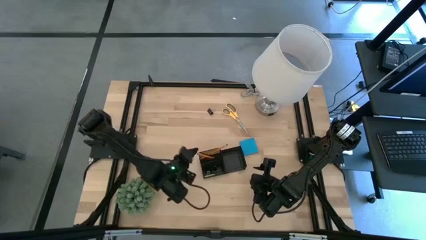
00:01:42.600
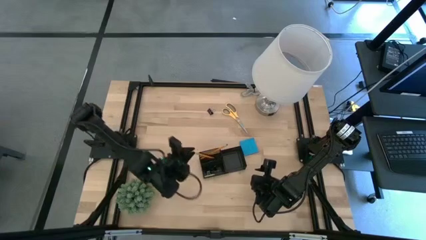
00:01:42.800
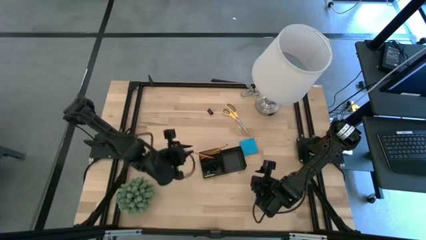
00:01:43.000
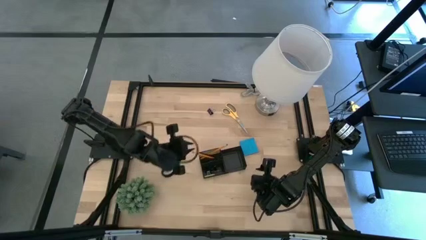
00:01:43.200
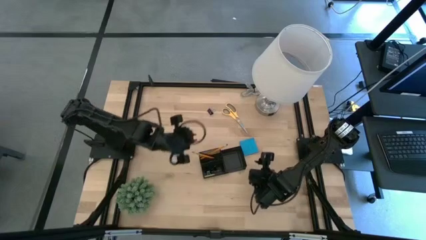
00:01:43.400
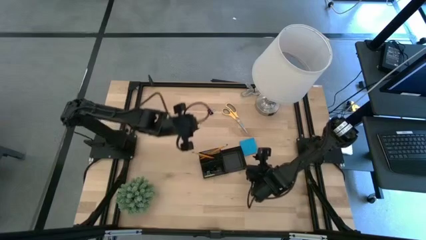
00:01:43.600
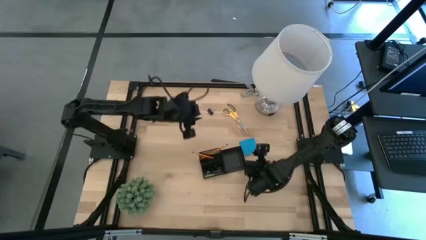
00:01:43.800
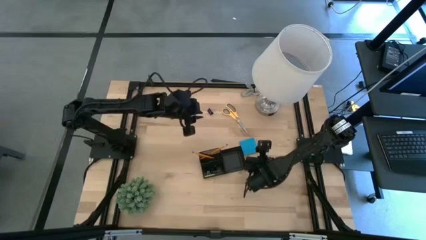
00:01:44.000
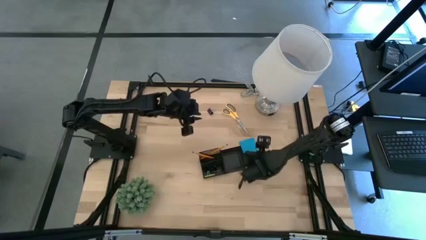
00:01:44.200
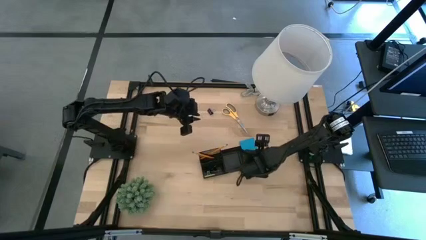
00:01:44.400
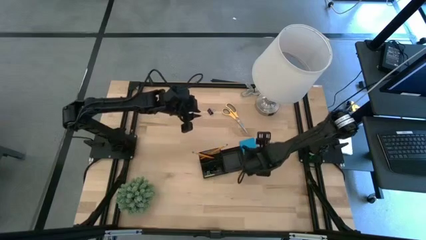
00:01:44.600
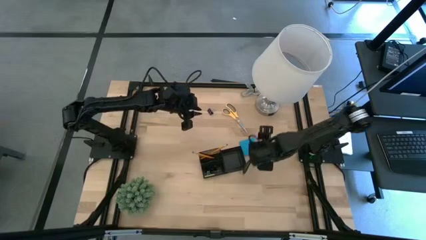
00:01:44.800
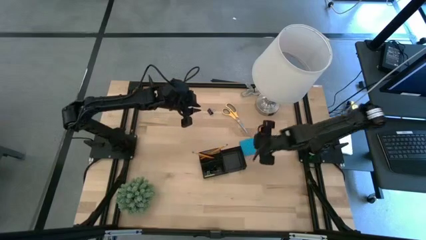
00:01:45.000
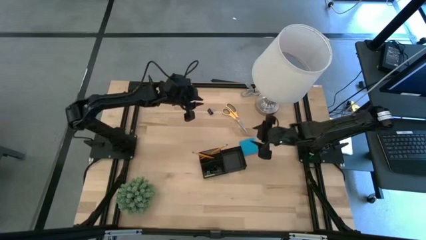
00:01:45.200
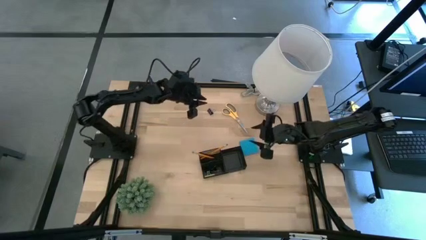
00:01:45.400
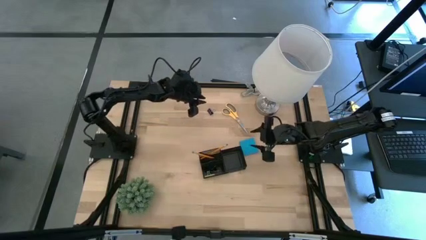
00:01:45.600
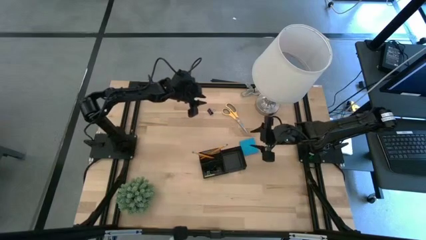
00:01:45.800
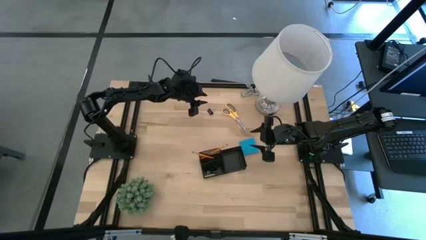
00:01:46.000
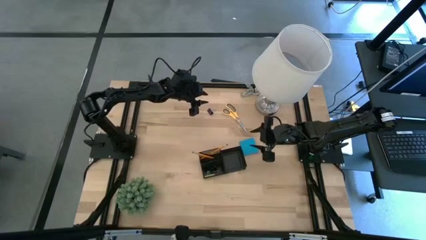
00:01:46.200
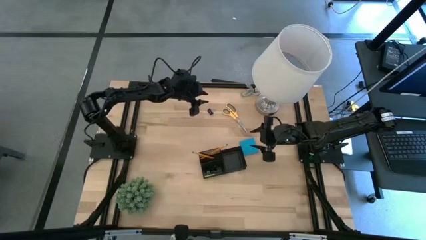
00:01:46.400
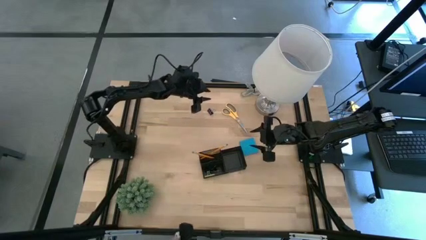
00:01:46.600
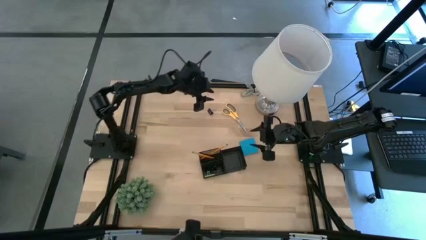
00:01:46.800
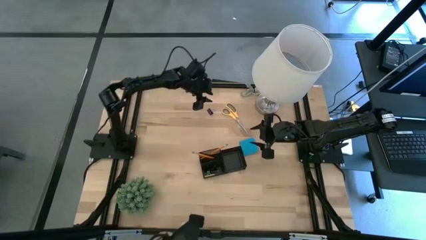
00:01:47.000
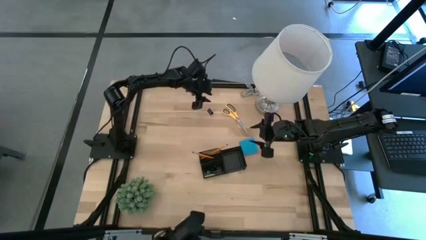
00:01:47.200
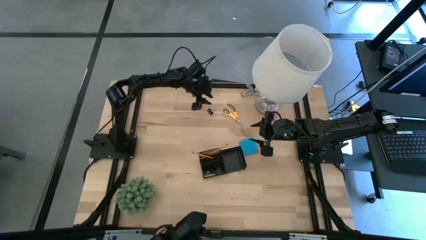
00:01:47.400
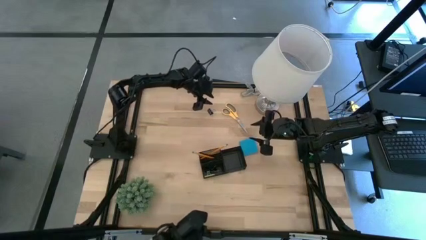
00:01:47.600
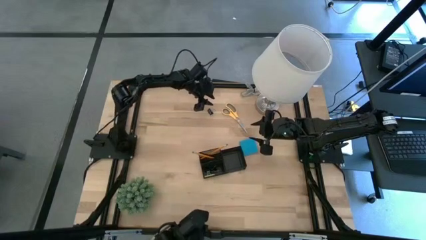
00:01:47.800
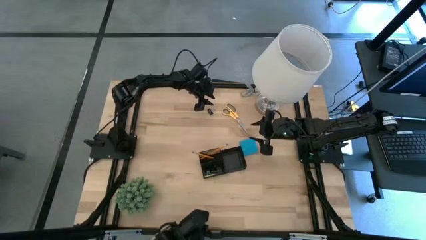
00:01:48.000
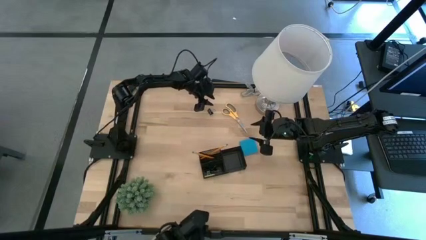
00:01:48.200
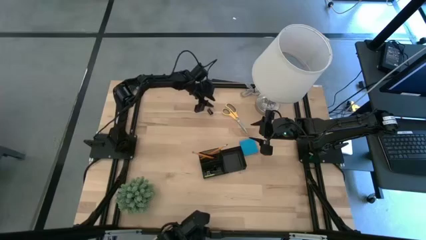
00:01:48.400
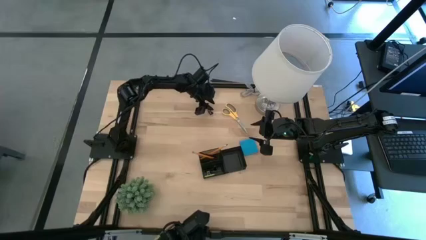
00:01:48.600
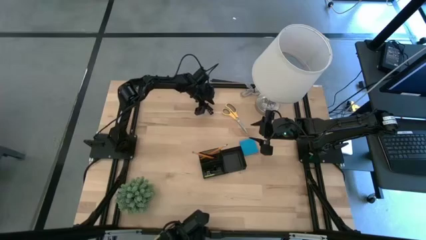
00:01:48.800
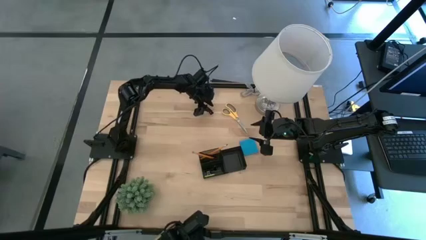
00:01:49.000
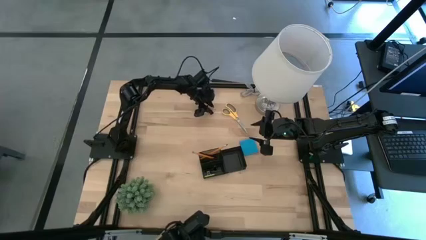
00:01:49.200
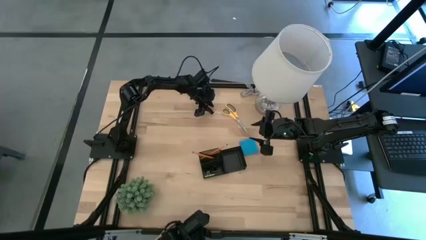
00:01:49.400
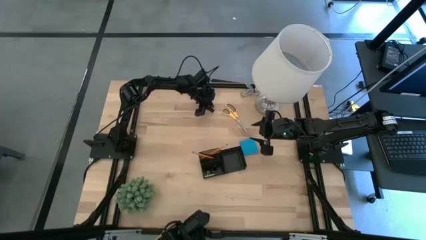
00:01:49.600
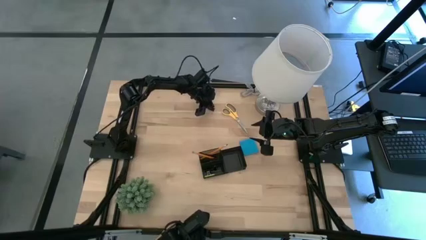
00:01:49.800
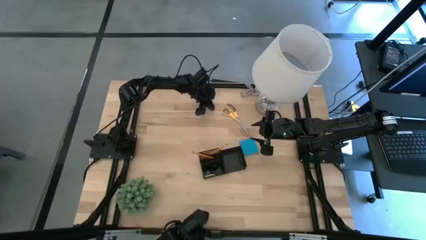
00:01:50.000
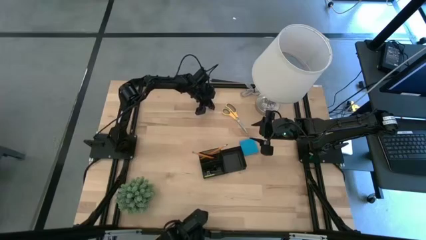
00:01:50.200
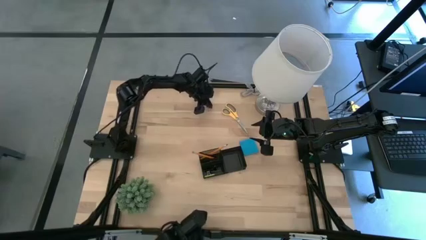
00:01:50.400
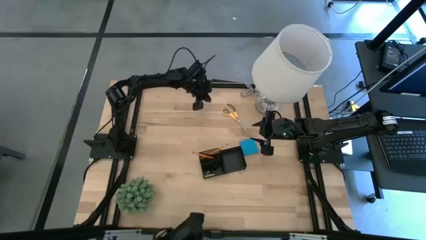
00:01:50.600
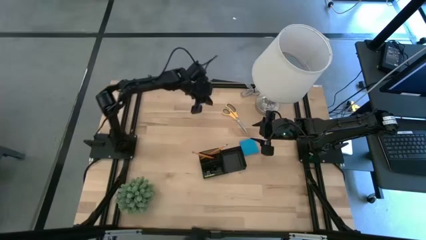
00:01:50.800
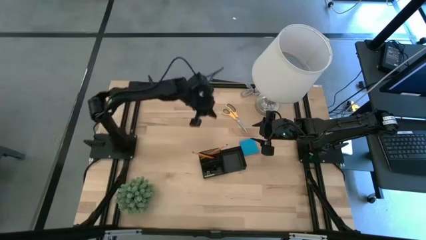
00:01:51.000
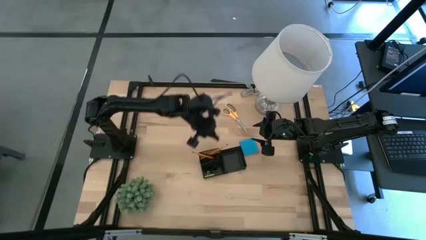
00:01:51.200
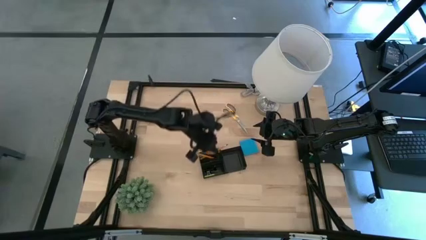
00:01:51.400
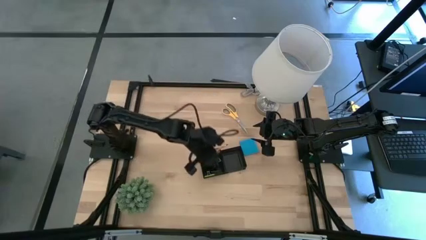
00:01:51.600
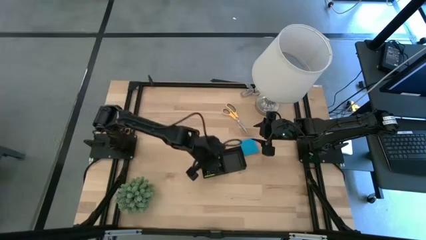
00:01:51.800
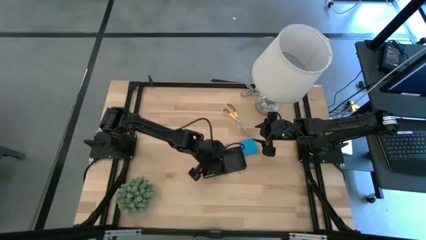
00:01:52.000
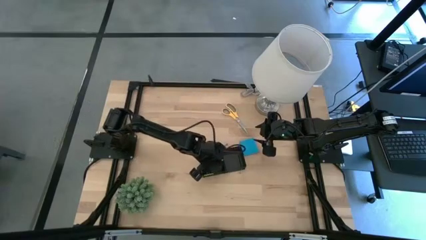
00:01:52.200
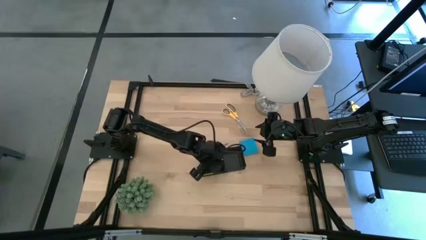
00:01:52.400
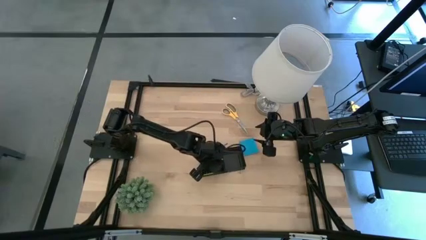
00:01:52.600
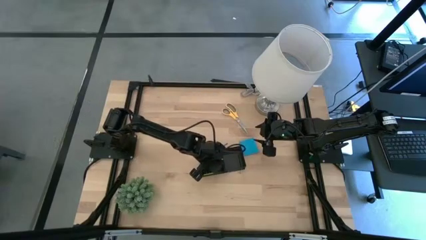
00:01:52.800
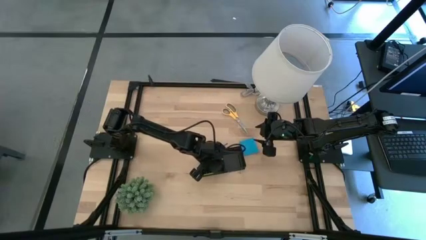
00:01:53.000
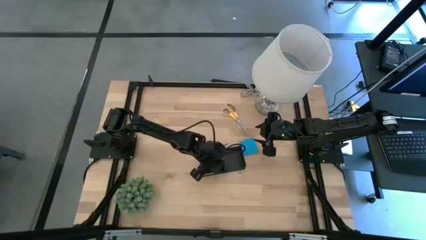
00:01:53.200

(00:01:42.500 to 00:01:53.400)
Task: Pick and place office supplies into organizer
Put the black binder clip into the desk organizer

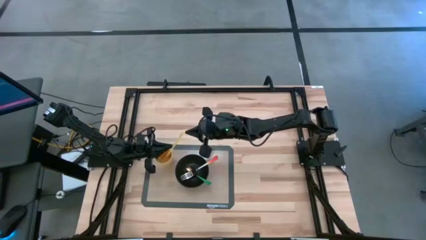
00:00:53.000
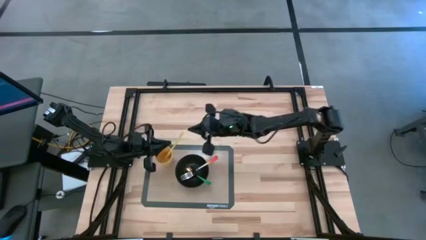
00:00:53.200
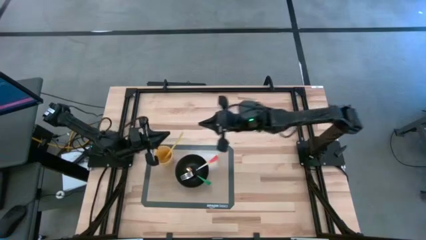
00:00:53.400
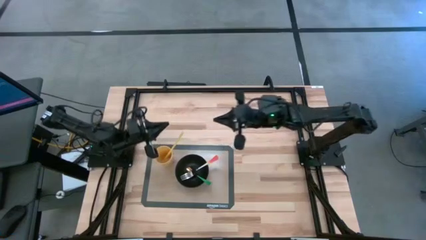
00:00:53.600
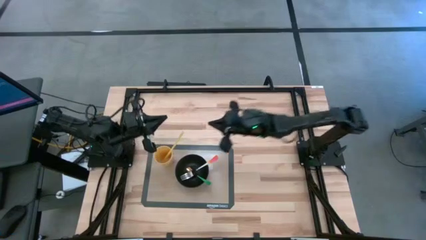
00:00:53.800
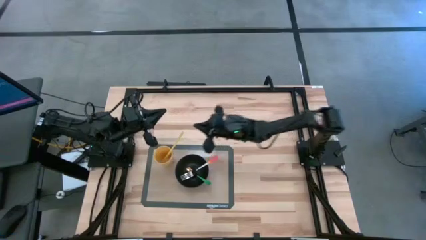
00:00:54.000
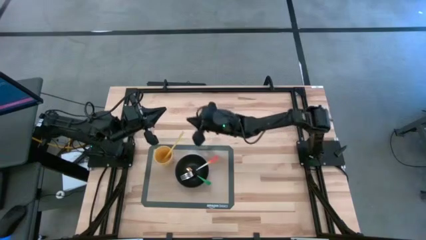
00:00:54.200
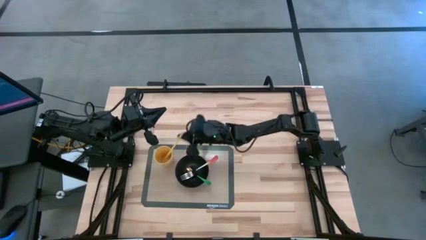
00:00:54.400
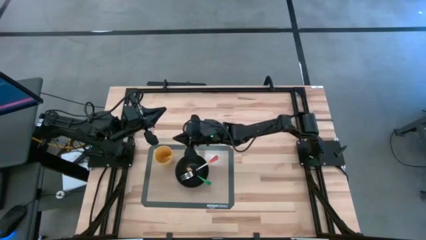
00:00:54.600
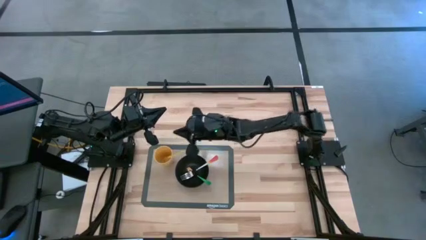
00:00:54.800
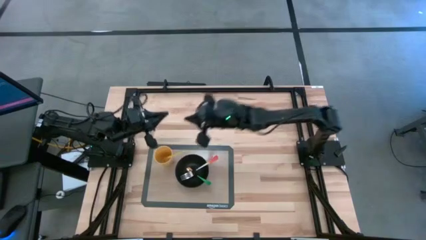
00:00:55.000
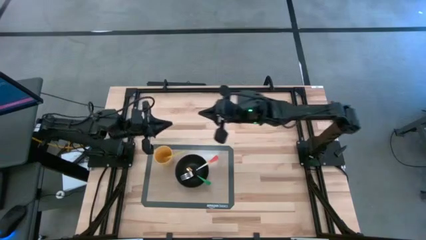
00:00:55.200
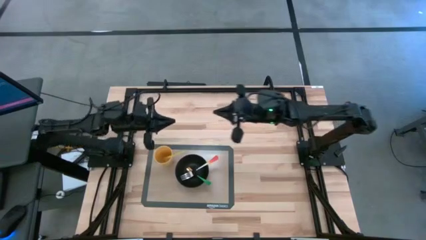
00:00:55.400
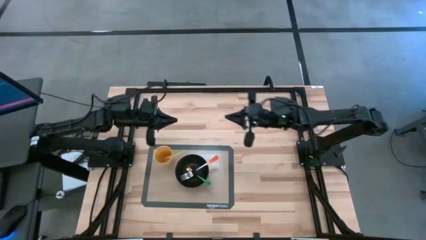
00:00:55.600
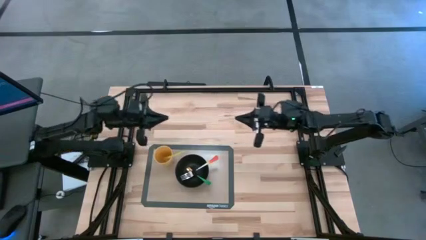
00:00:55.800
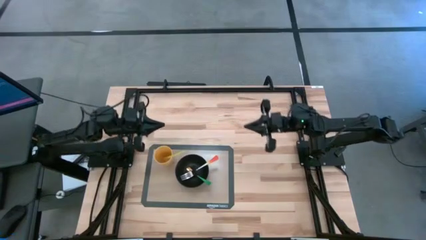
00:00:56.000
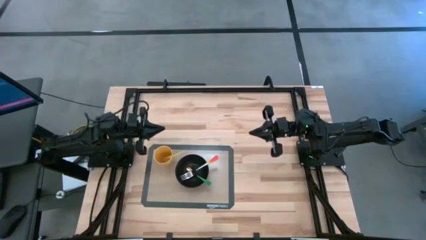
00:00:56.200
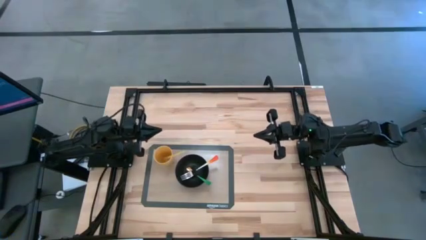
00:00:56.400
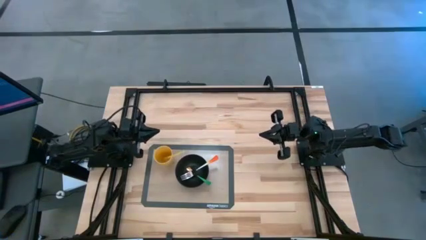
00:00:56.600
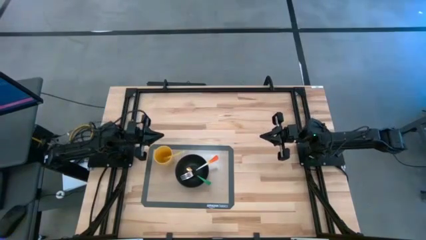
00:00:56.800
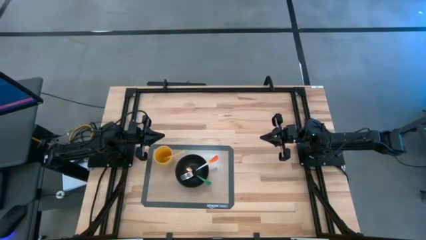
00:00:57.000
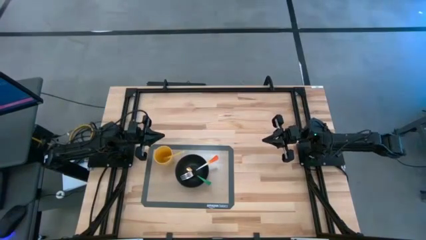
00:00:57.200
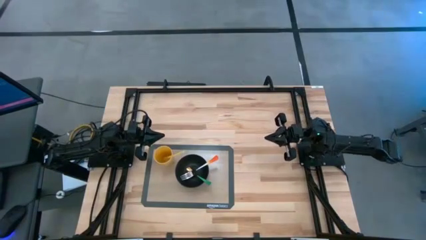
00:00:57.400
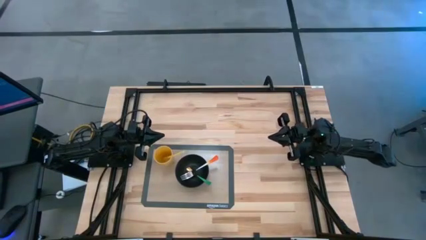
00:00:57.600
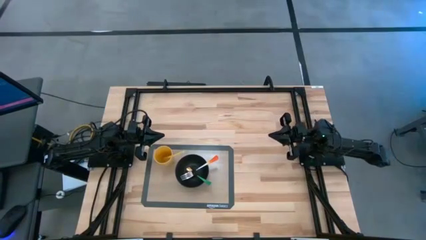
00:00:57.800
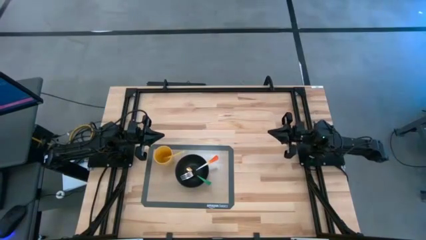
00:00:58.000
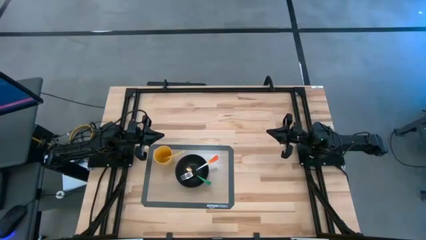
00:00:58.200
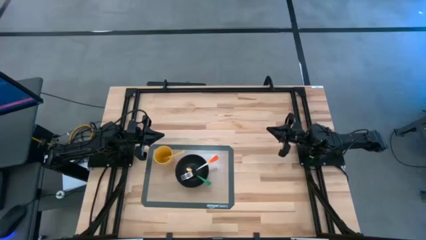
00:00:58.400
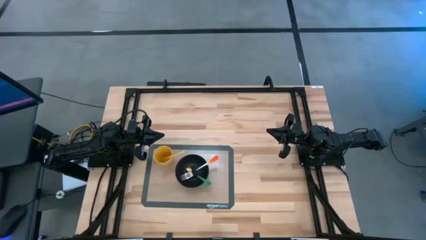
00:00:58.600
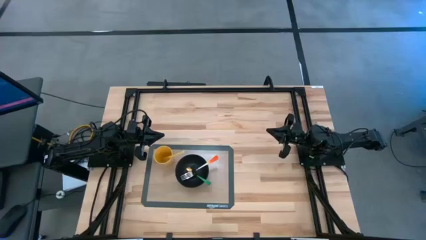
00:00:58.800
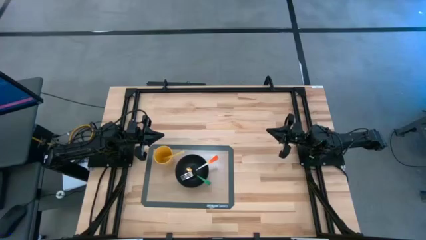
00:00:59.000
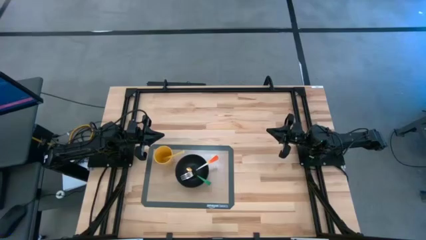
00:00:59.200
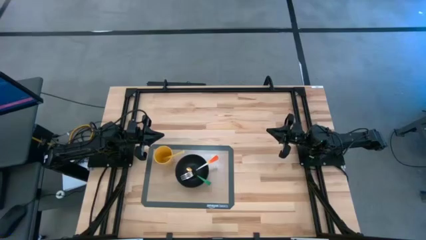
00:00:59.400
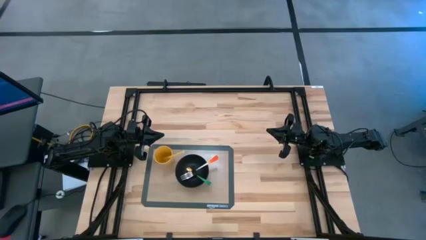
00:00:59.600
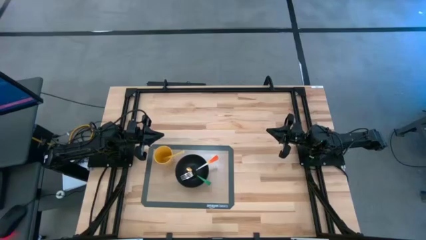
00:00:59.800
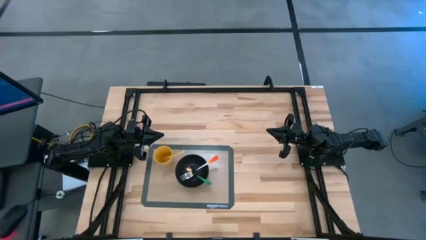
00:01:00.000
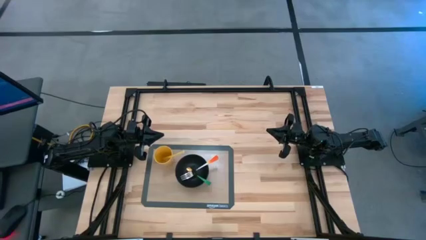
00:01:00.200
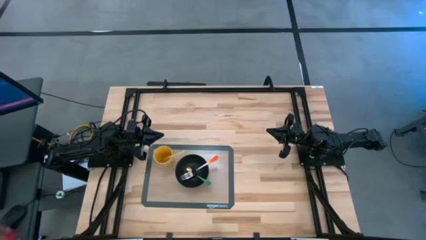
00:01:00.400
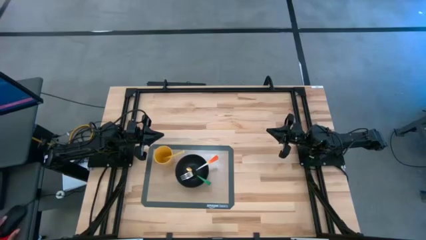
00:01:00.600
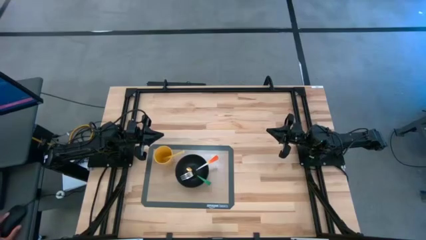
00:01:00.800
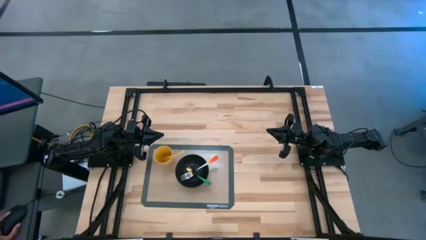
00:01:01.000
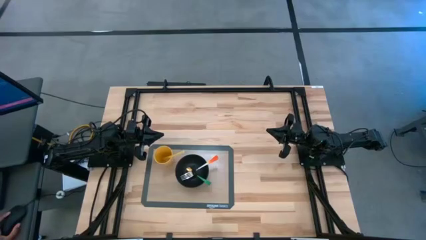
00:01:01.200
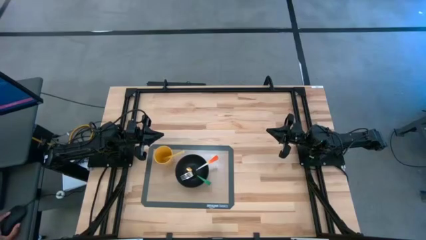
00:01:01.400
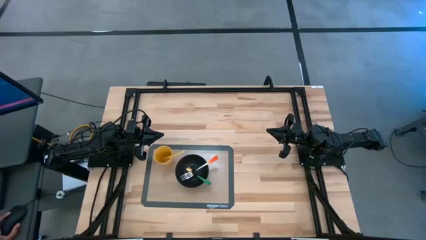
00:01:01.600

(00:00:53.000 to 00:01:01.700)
Task: Pick & Place Utensil
Return to Home Position
